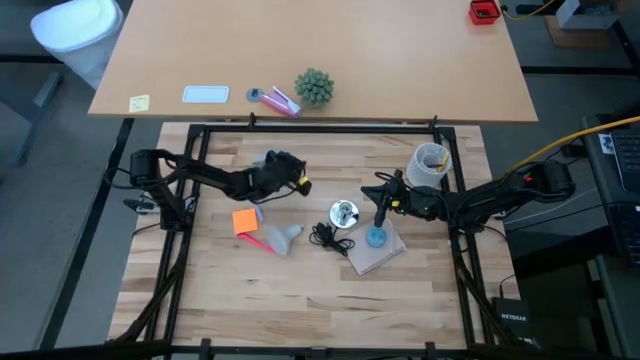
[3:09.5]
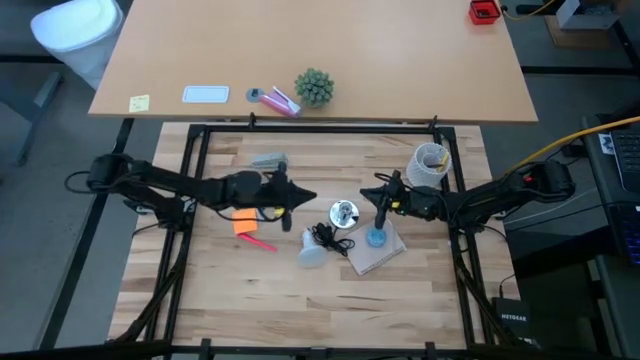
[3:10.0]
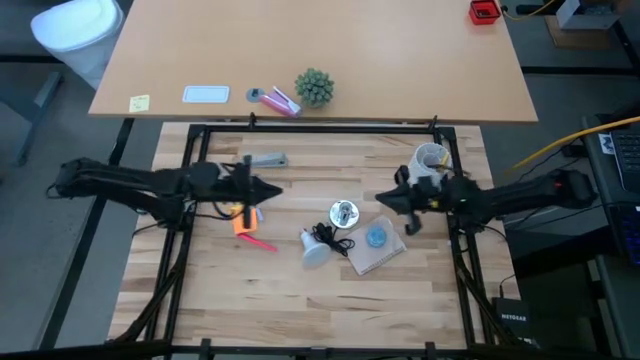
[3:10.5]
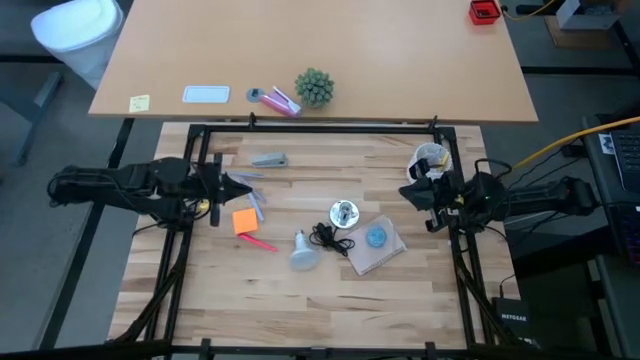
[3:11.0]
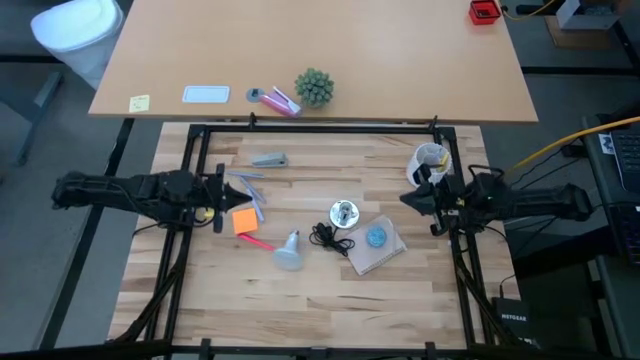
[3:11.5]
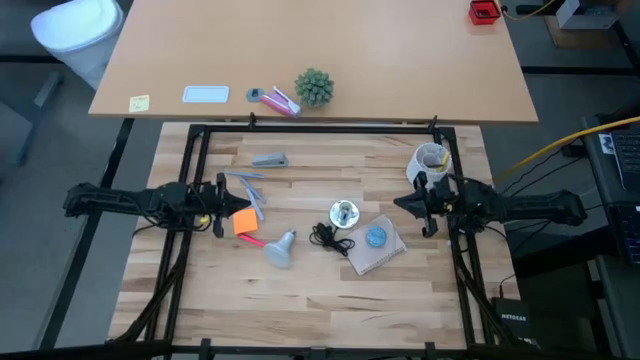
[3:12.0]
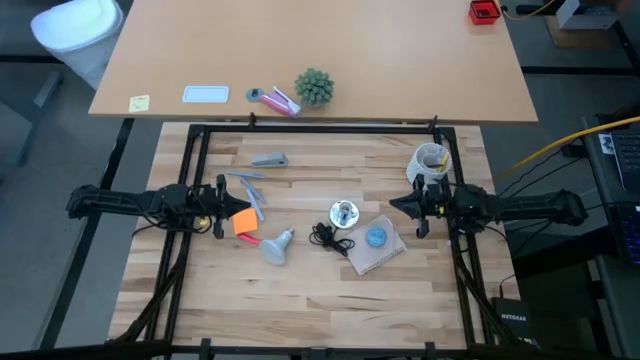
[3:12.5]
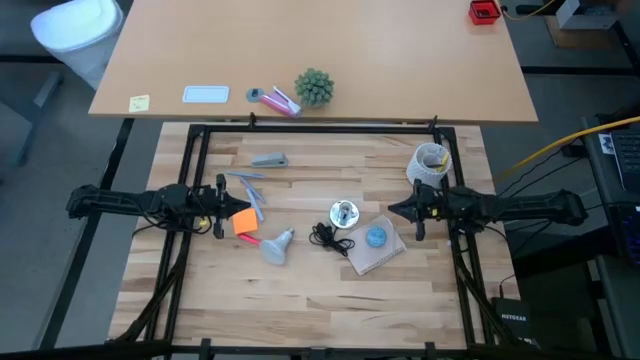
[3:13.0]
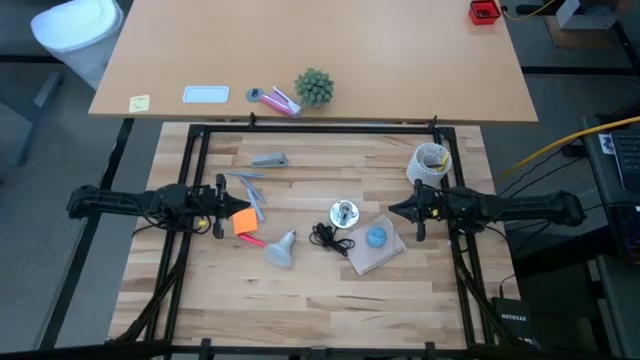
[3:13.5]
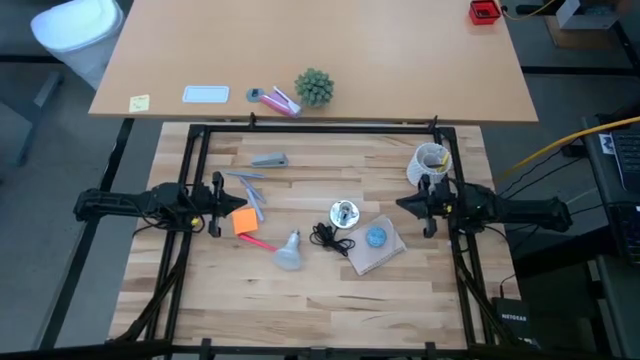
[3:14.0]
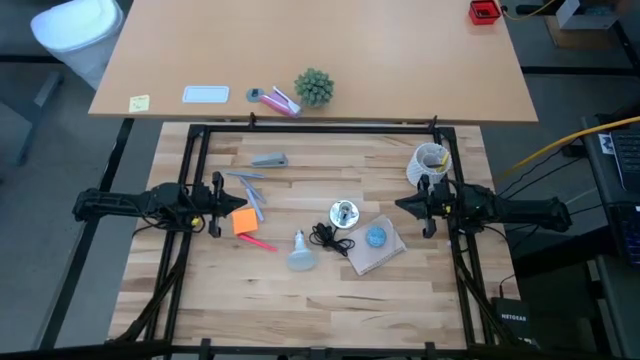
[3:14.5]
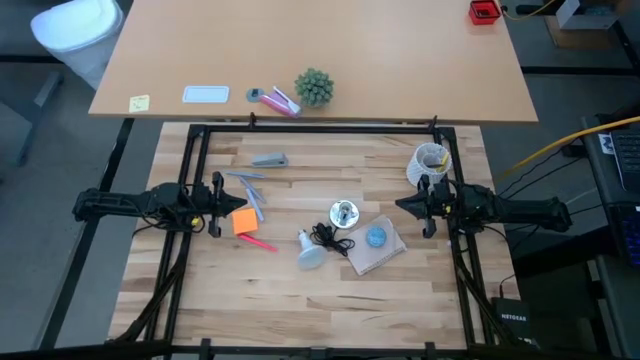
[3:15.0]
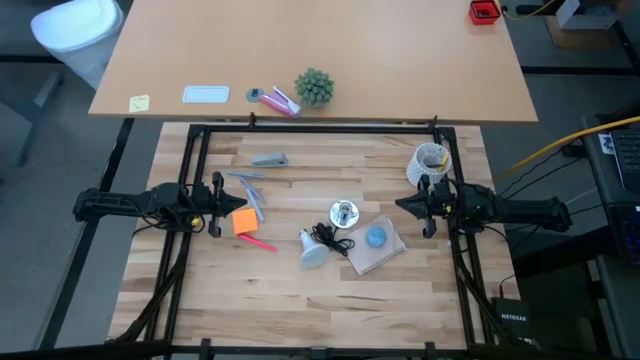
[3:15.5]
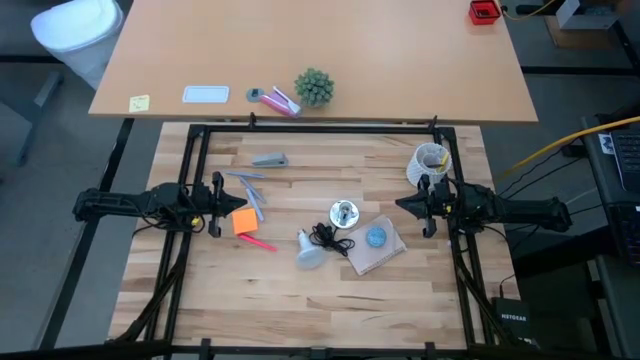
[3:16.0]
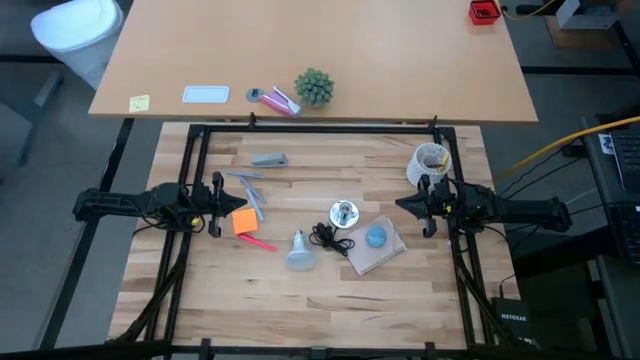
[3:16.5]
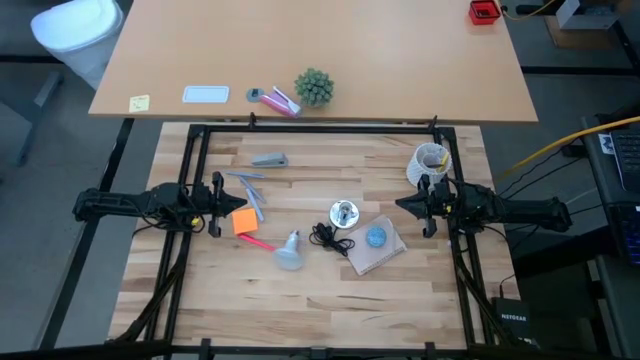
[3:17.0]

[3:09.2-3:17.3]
Task: Screw lightbulb
Return to Home Position

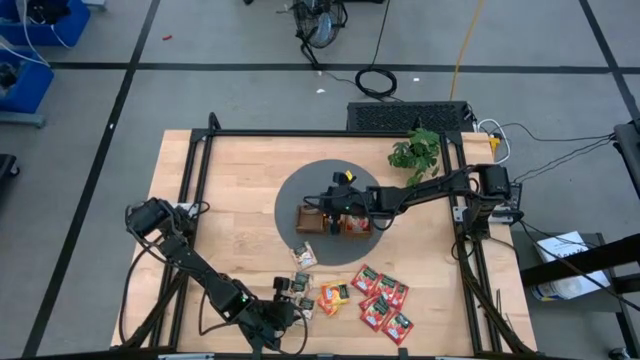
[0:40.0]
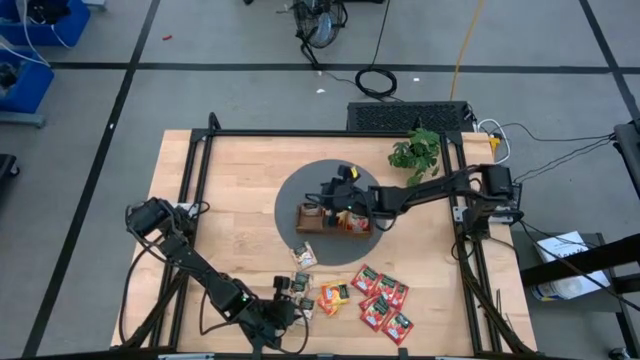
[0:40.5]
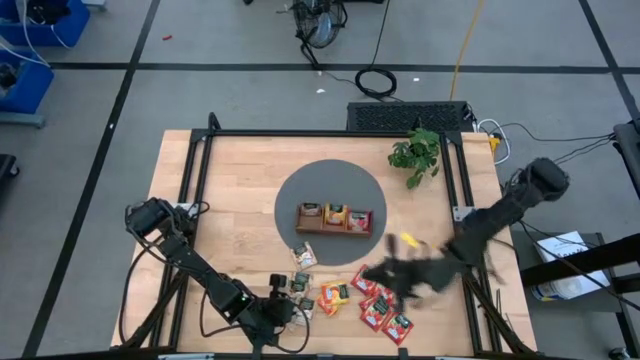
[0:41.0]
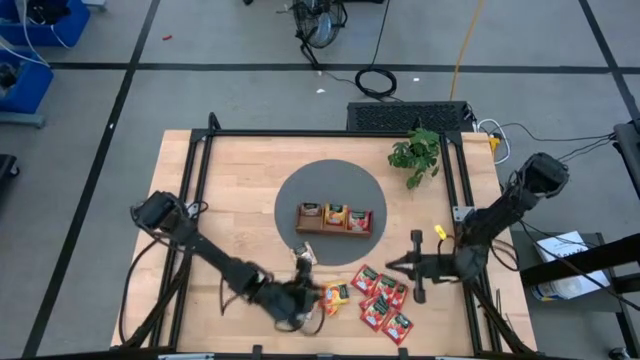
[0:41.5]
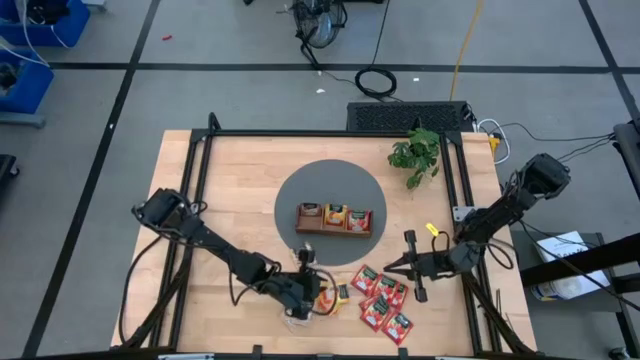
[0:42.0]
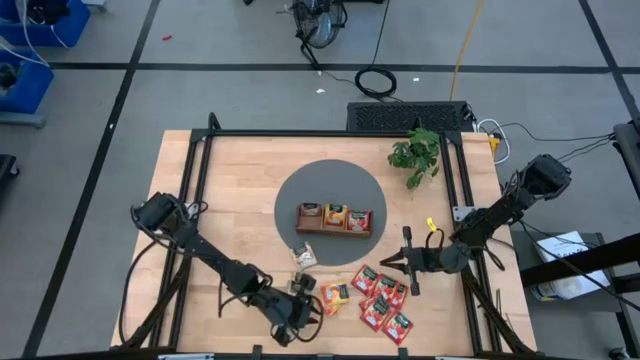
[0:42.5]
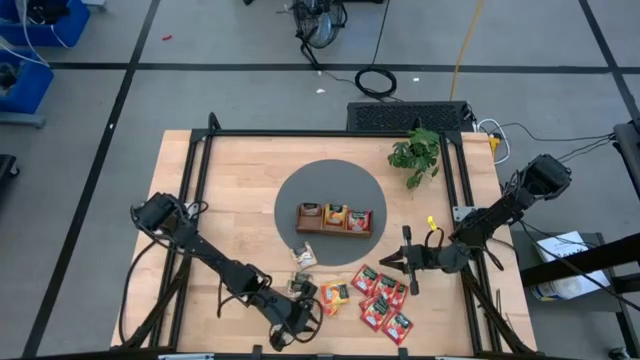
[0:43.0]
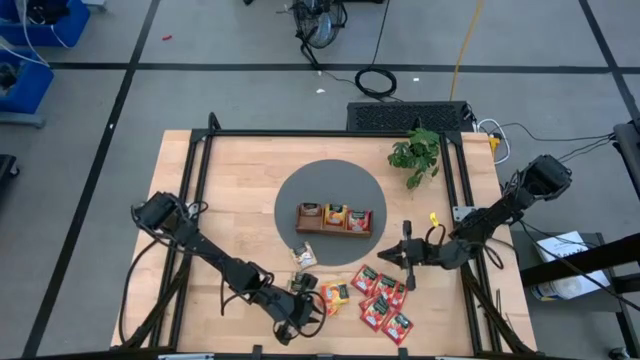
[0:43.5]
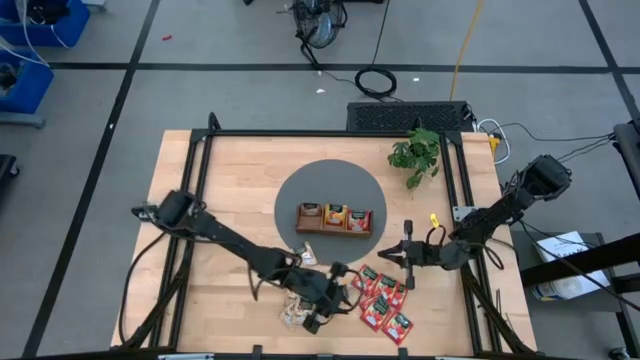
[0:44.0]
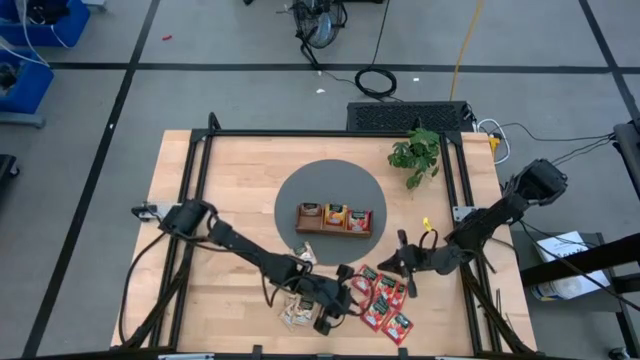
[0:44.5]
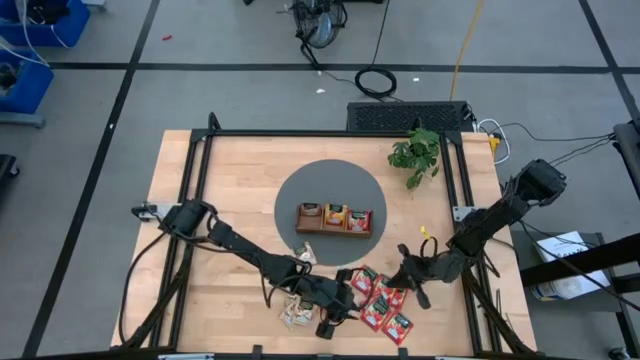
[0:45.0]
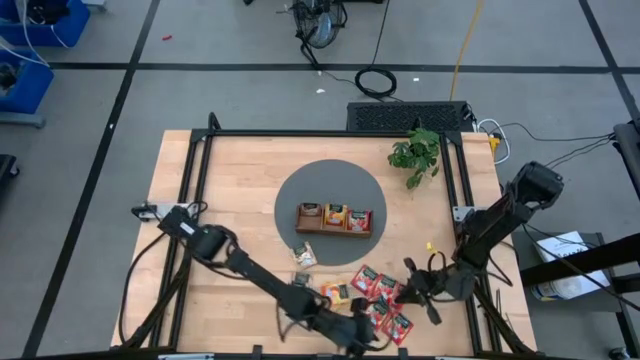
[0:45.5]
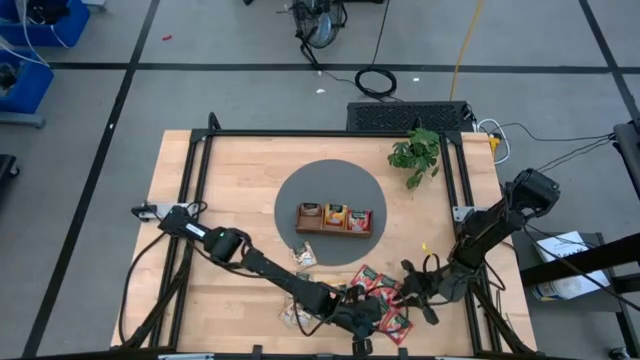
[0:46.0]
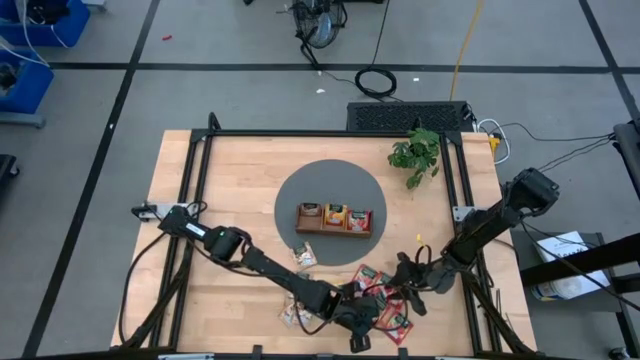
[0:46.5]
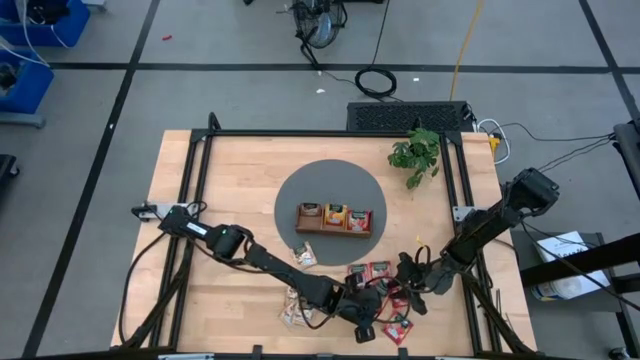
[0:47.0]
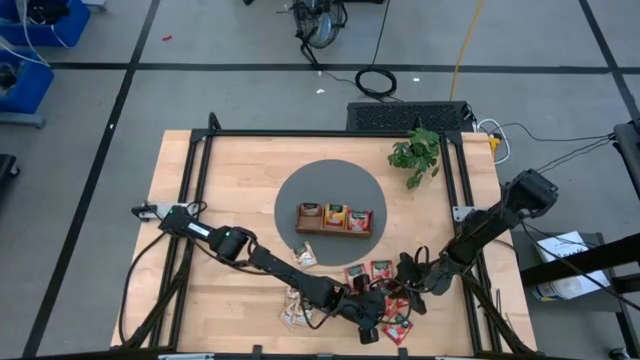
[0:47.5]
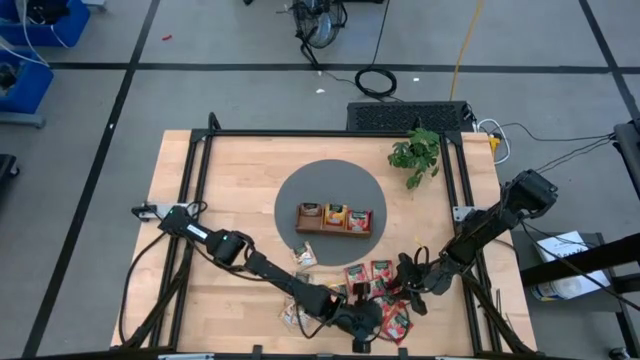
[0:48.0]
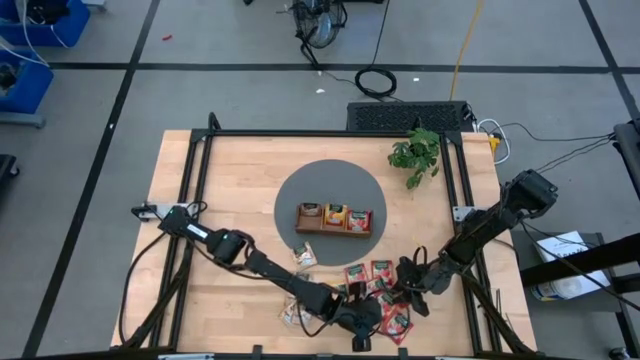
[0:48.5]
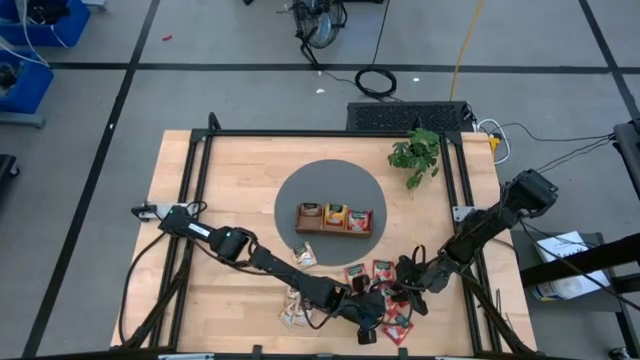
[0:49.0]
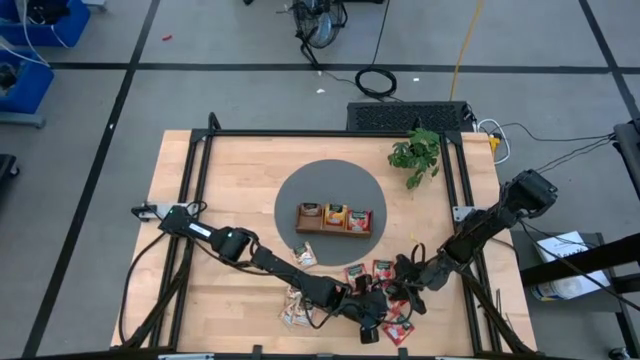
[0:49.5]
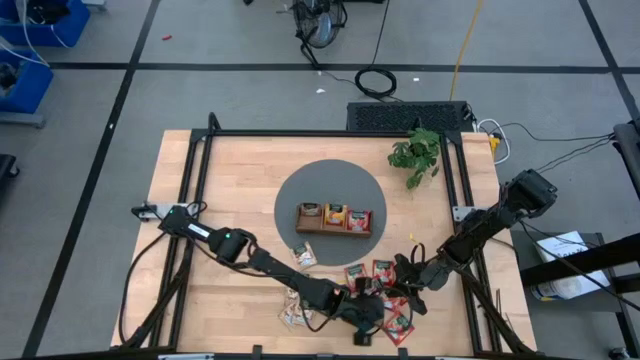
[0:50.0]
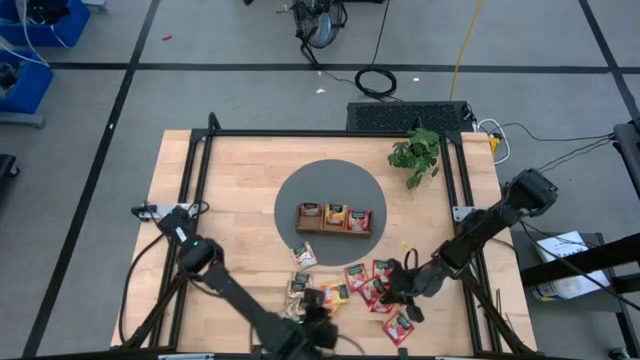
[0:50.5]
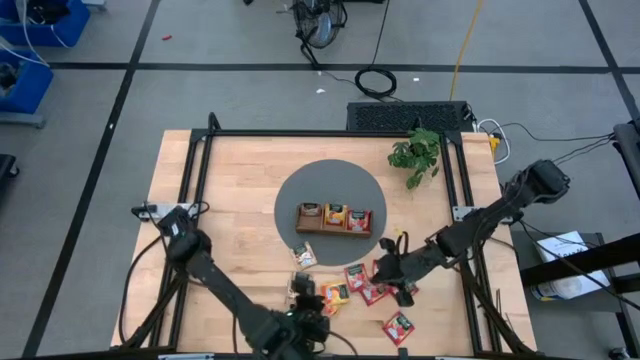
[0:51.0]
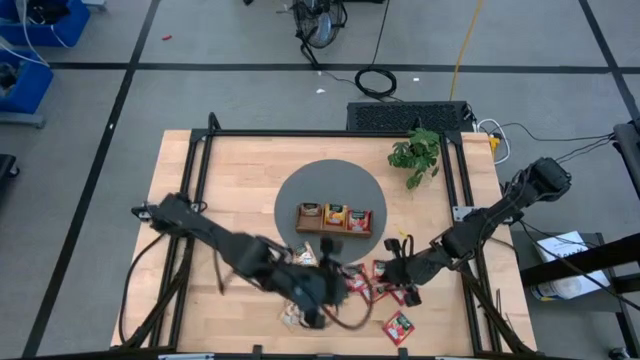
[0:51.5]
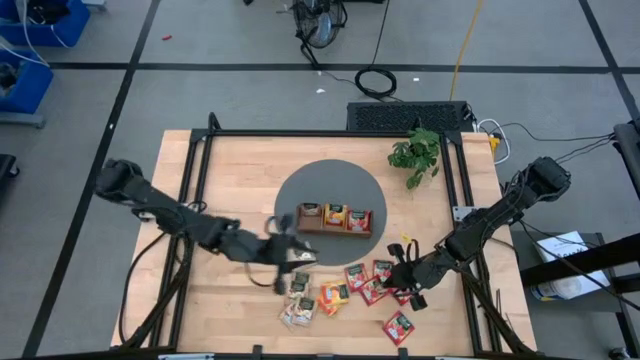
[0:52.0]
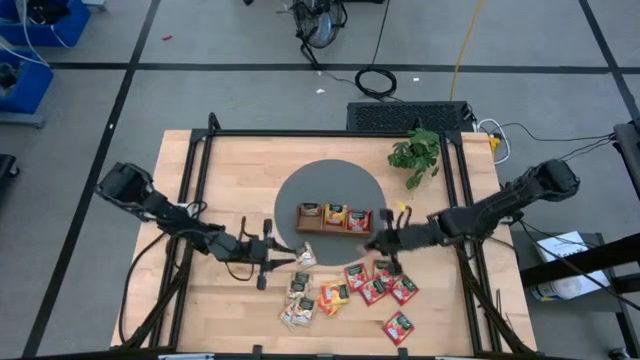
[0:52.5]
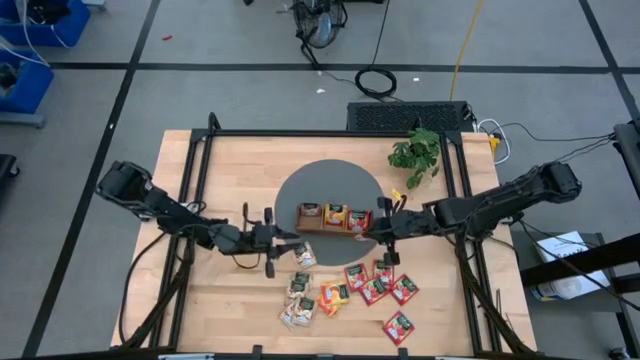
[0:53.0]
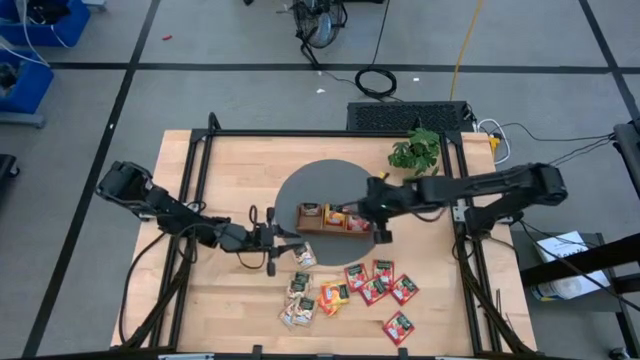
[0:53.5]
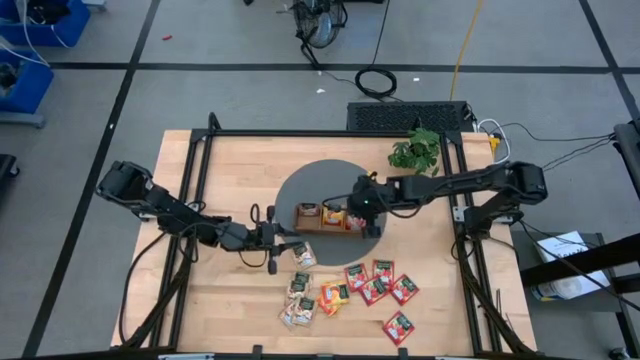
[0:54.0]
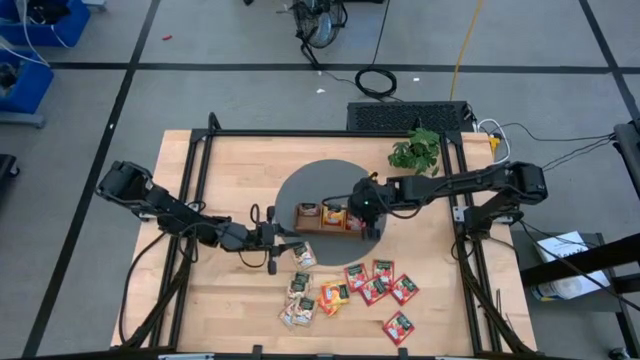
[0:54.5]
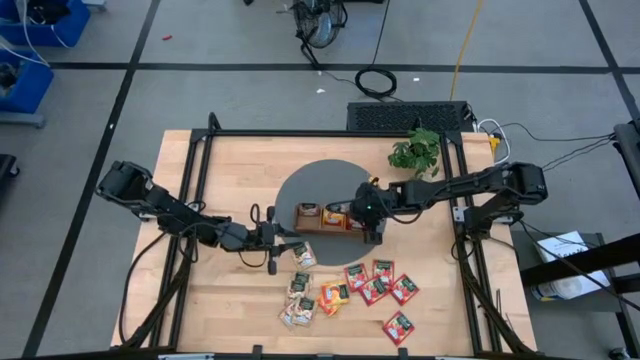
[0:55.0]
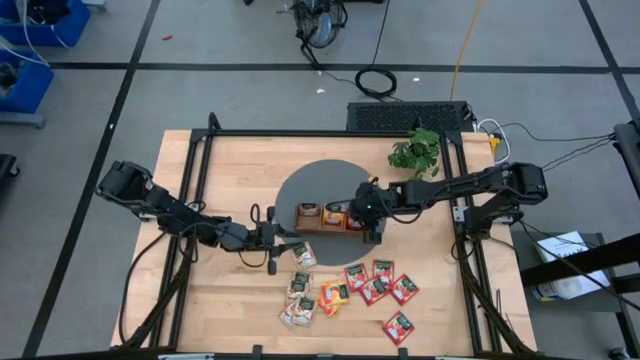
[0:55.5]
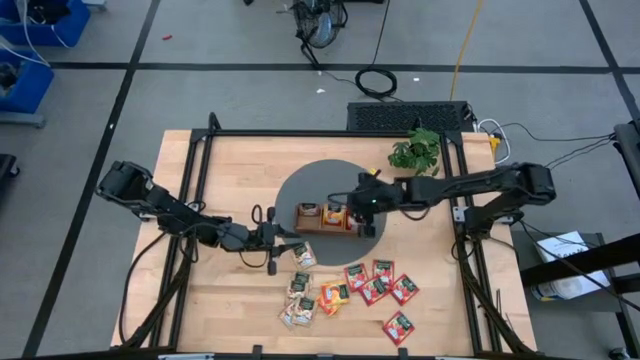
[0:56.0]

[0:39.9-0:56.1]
Task: Pick & Place Tea
Put the red tea bag into the right section of the wooden organizer
